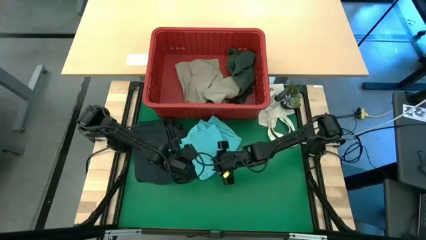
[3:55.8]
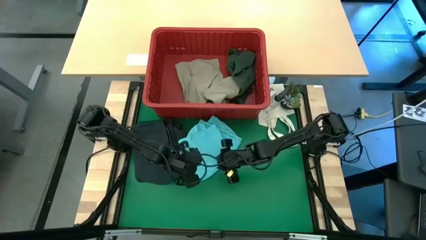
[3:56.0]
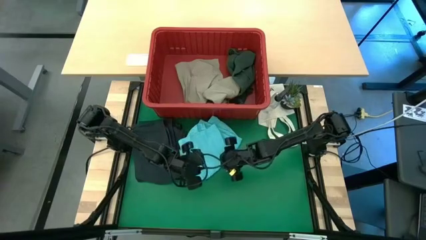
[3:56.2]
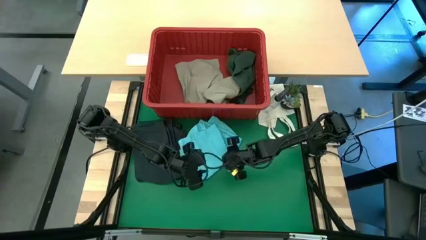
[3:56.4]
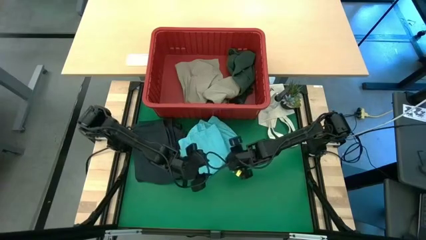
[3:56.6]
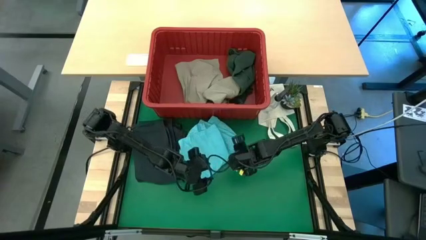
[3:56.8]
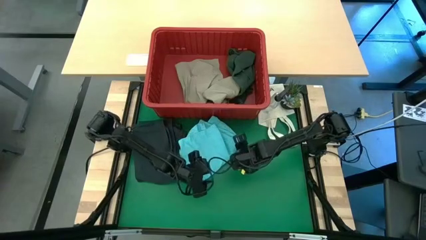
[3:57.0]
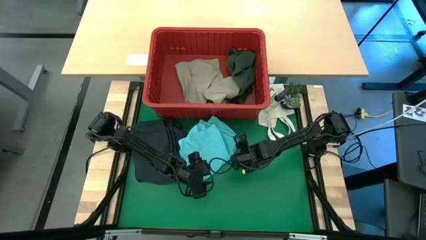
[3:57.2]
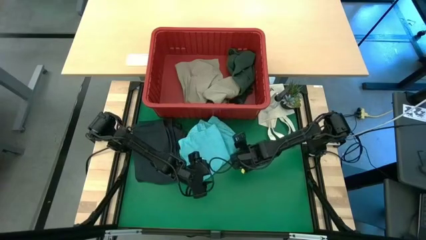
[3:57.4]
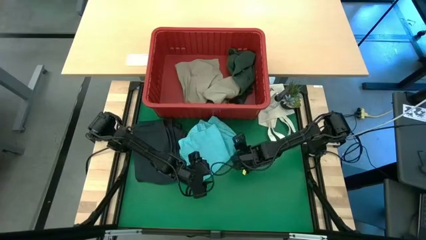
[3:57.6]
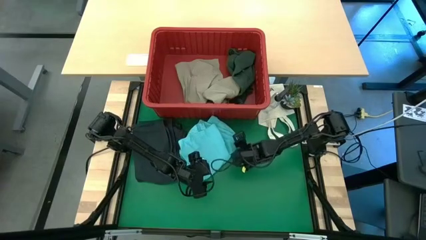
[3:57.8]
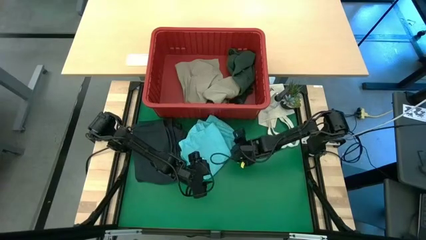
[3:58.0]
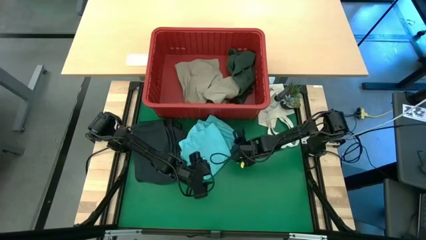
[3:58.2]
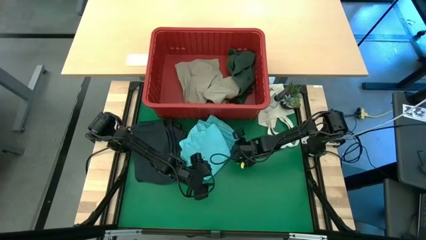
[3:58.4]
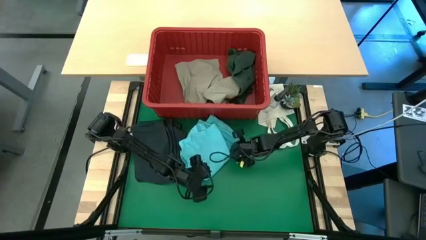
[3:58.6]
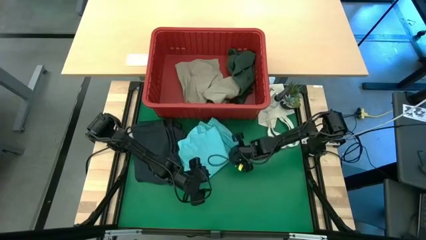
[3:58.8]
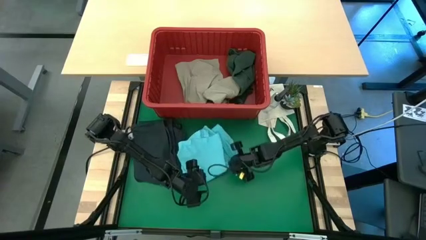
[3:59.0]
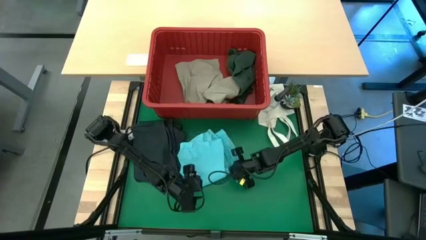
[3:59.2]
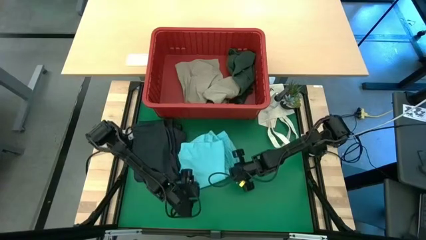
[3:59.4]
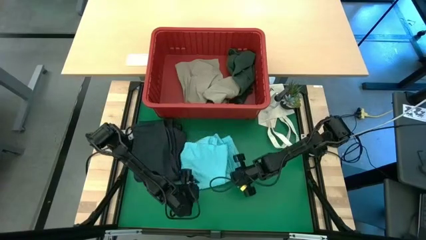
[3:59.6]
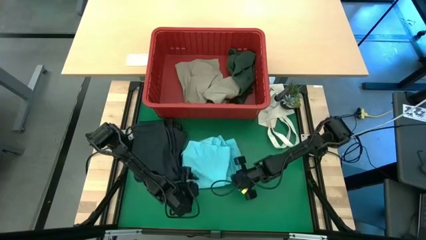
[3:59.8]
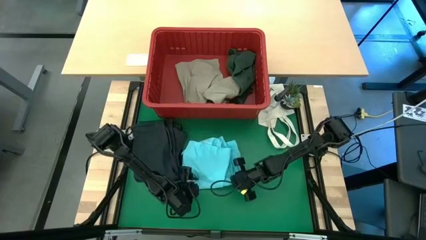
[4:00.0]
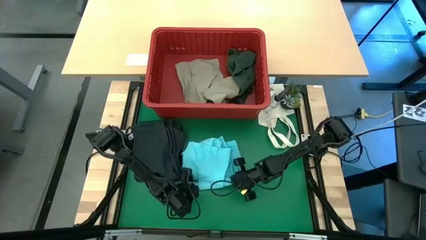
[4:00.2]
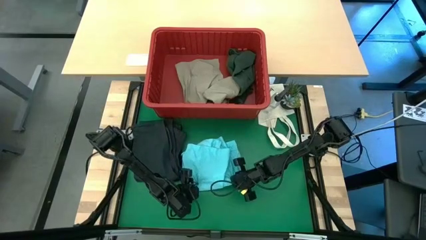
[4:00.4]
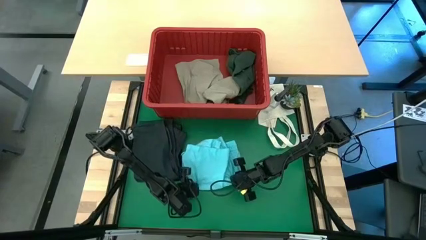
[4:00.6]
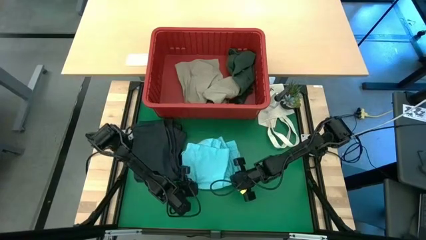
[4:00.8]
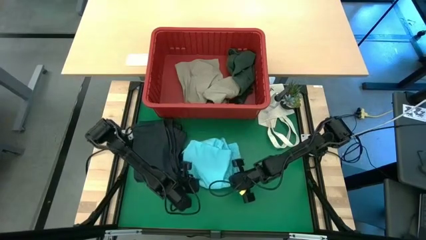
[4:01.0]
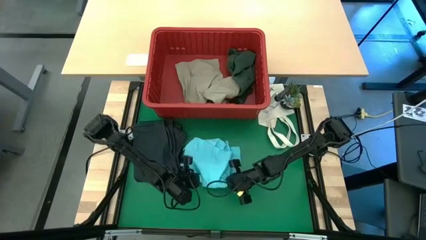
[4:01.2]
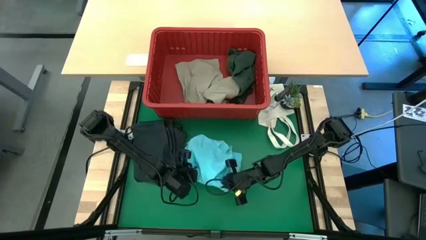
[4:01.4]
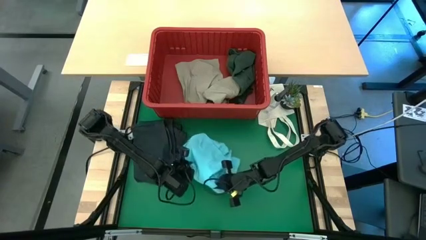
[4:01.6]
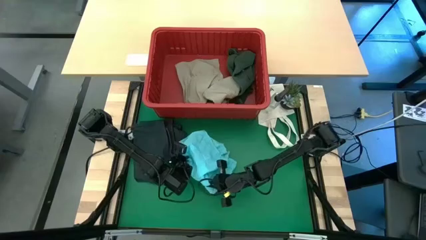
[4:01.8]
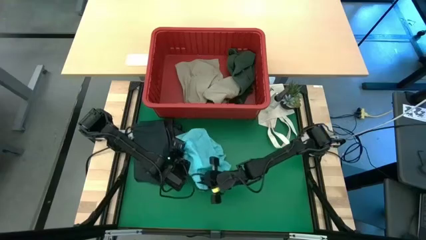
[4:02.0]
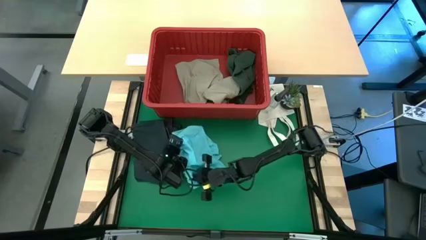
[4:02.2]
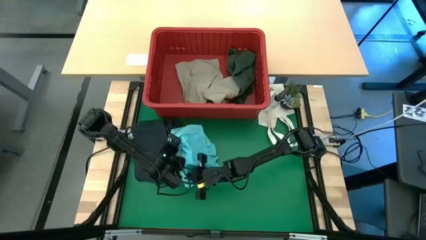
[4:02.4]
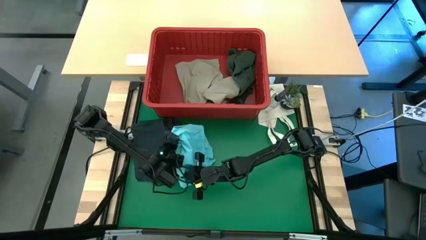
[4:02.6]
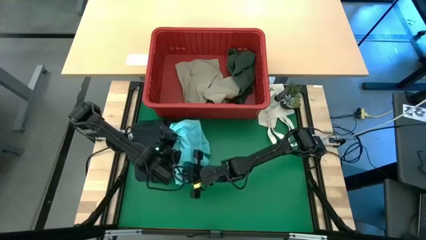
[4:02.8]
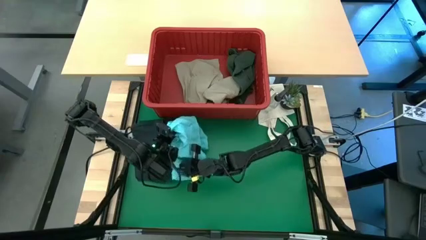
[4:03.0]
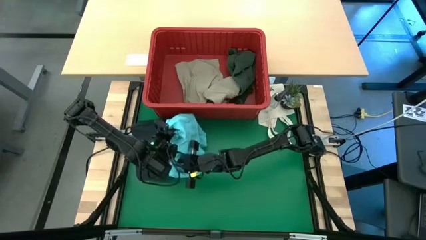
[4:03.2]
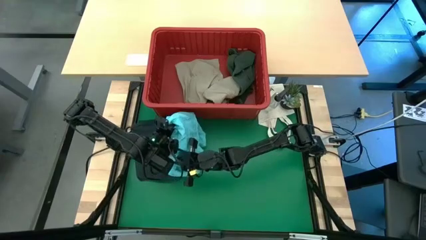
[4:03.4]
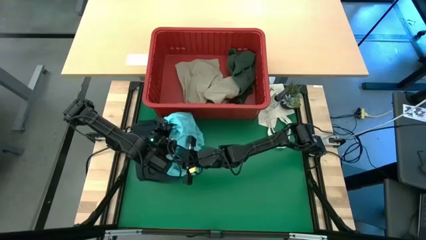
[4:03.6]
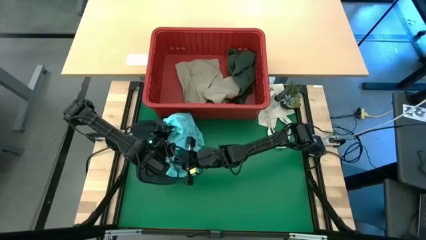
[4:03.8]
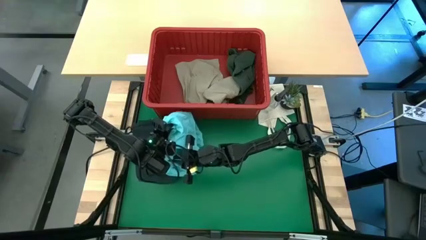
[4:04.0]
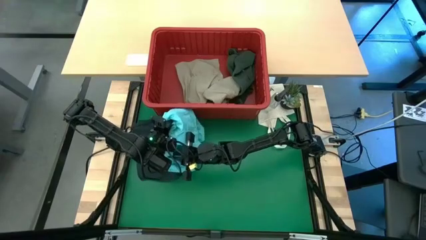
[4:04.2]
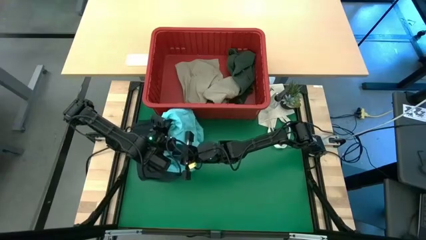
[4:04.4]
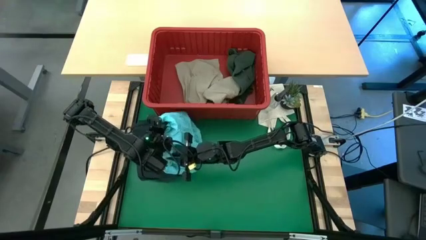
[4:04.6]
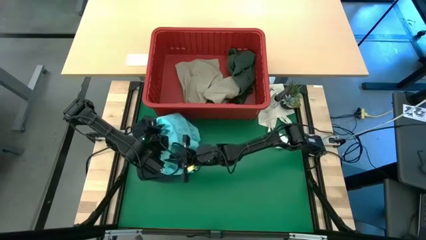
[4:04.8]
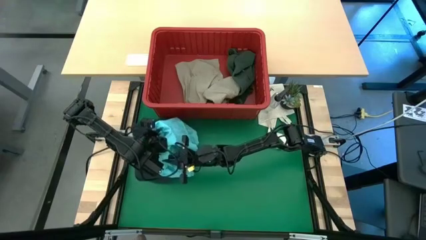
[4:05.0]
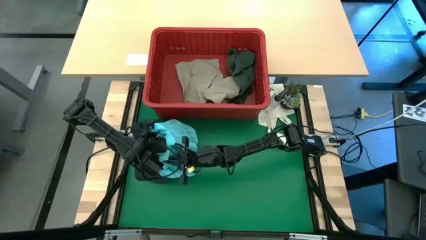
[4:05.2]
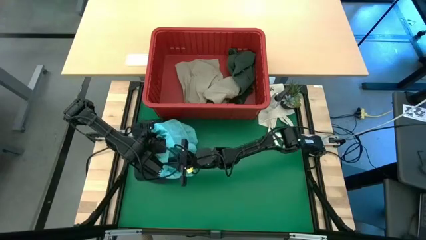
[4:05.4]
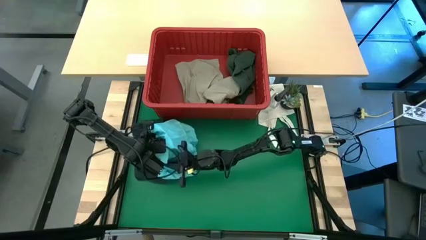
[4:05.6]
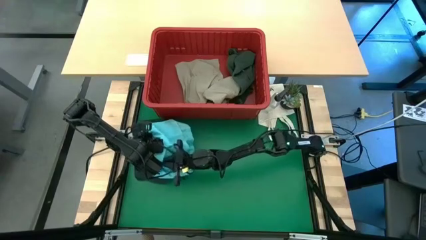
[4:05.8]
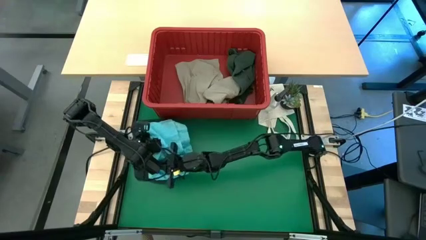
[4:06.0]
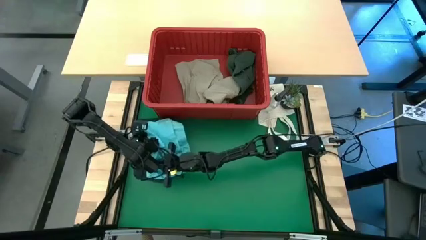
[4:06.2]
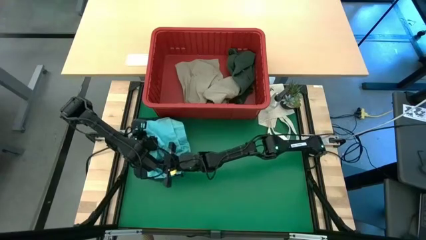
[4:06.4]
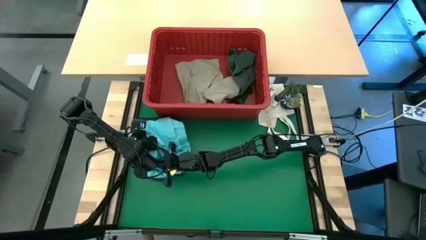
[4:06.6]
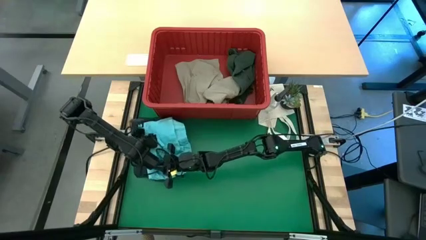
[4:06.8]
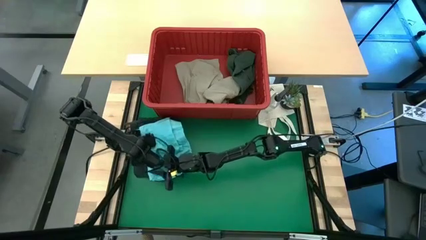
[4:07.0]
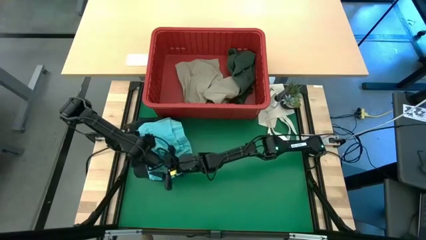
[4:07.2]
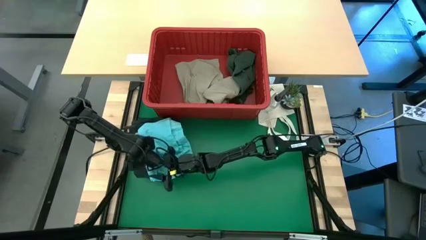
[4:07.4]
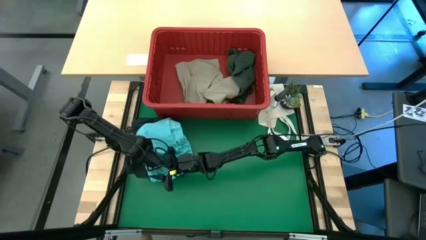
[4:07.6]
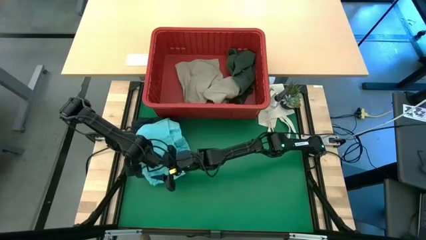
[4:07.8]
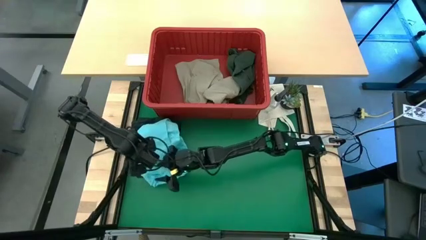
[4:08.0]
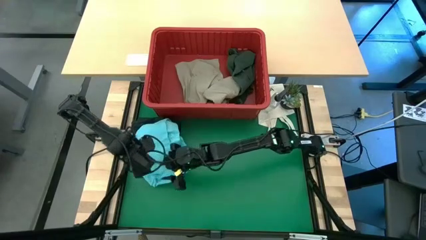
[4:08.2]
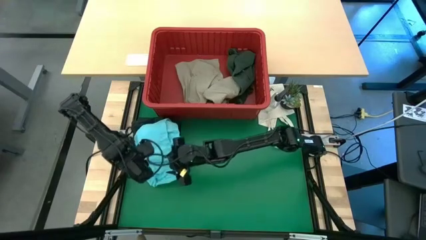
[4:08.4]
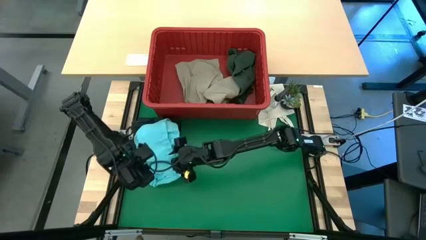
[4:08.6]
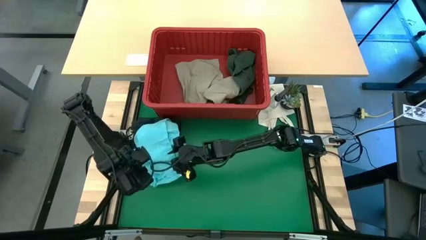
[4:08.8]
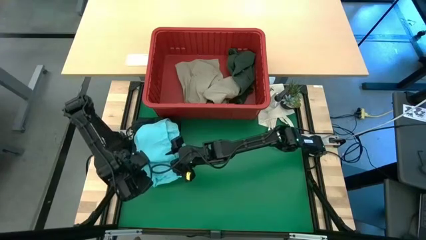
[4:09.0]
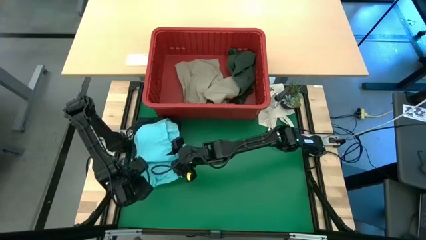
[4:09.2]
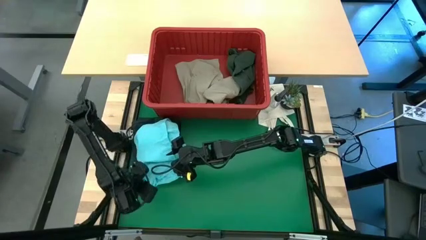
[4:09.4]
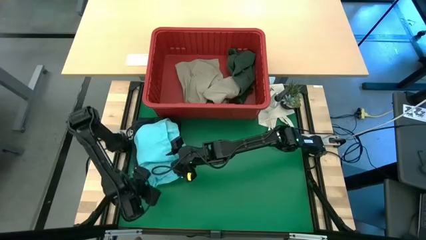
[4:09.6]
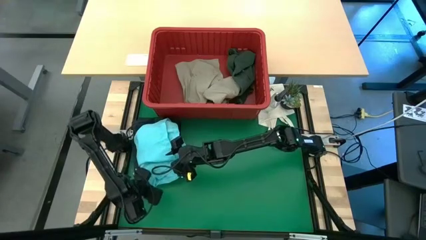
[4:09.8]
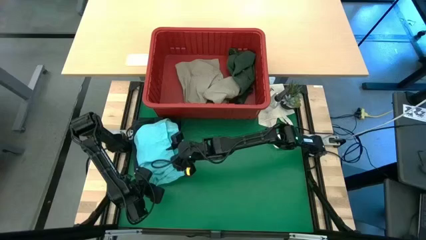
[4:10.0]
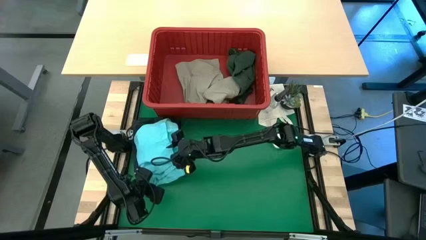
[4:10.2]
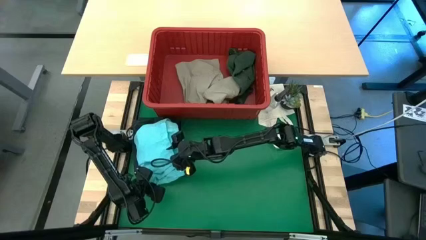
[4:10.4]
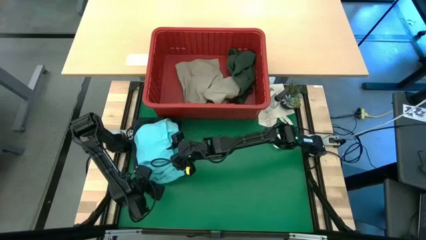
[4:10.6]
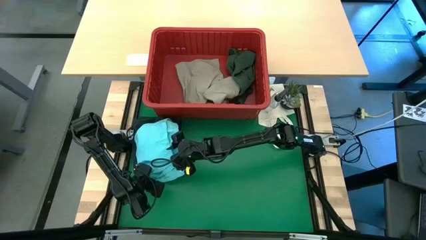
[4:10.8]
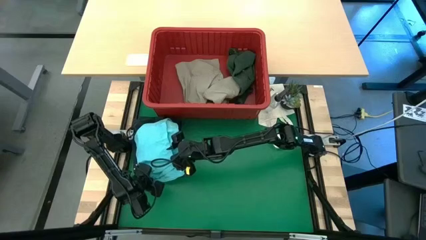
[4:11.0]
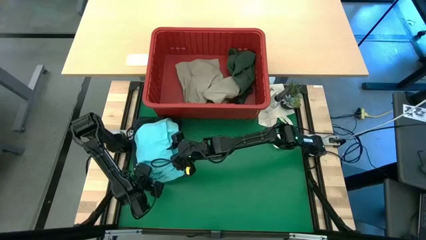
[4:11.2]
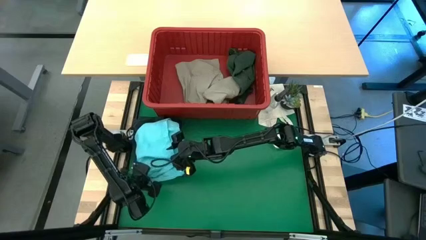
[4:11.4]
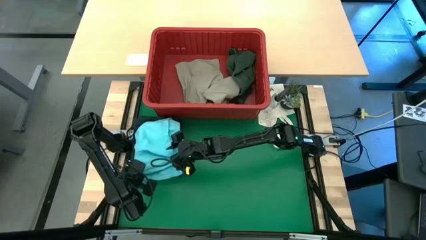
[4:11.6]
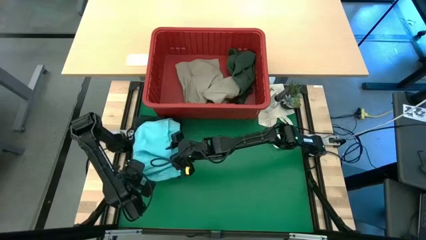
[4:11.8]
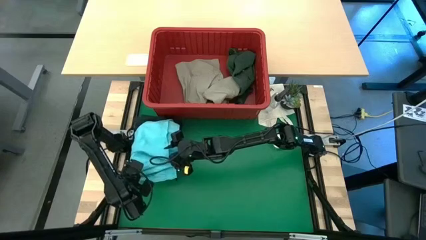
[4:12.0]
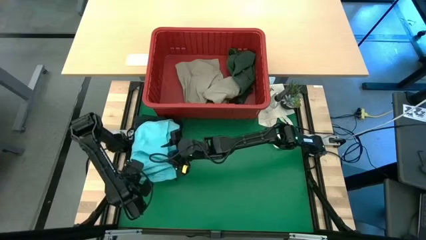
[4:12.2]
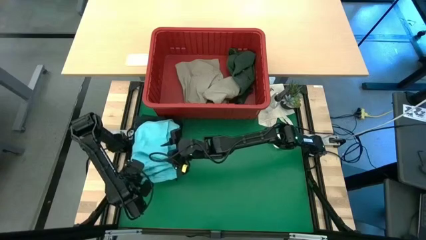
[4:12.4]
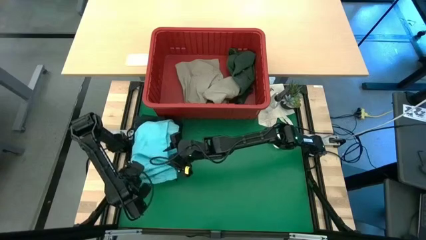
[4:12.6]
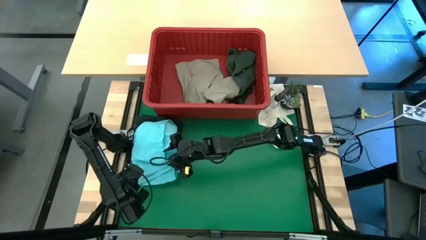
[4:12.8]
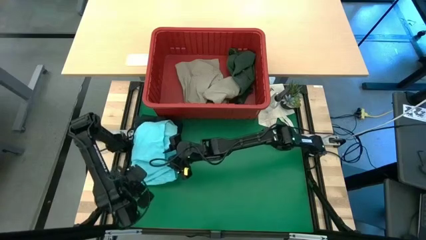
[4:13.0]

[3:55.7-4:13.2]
Task: Fold Laundry from Bin
Stack the folded blue shorts on top of the folded black shorts
